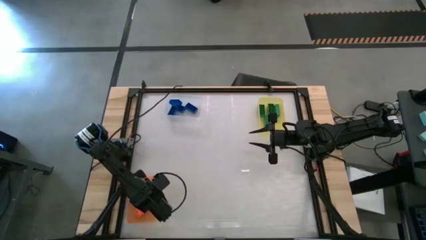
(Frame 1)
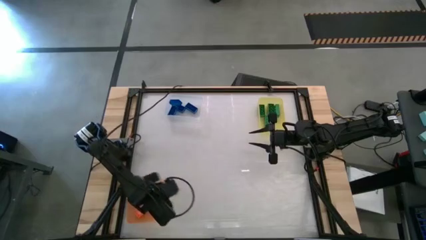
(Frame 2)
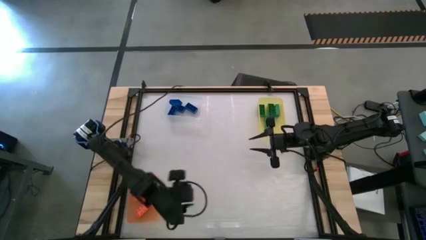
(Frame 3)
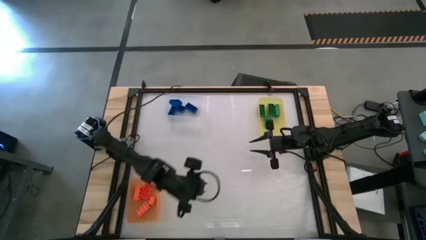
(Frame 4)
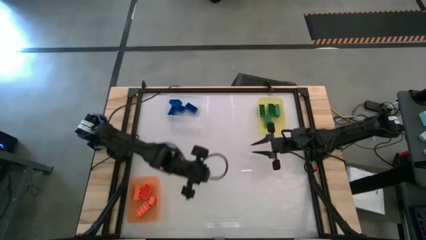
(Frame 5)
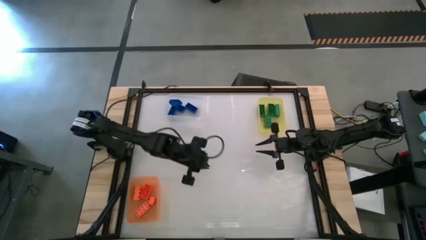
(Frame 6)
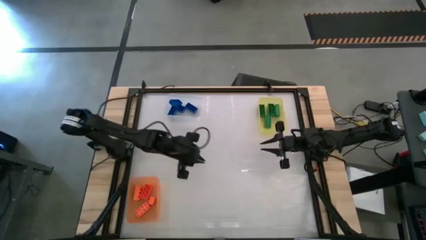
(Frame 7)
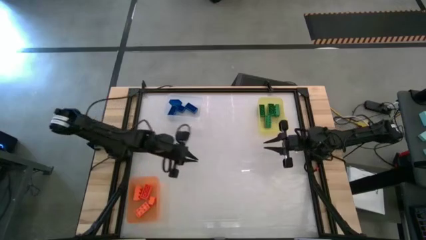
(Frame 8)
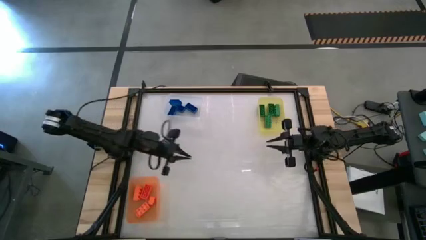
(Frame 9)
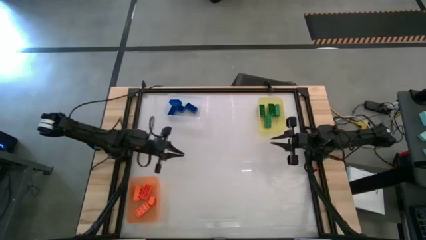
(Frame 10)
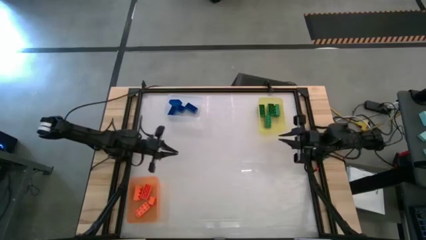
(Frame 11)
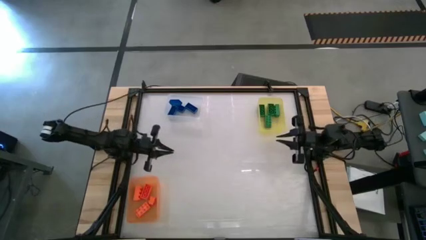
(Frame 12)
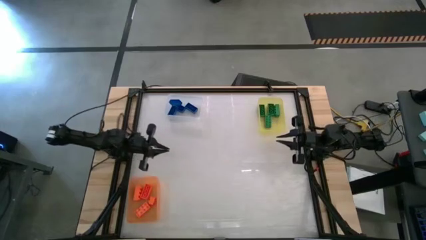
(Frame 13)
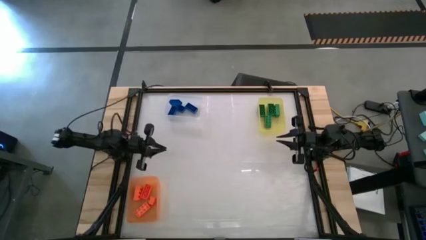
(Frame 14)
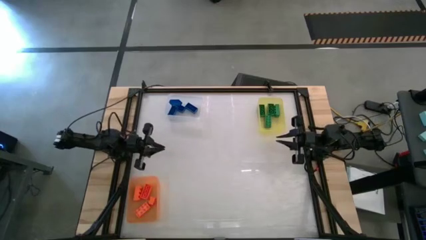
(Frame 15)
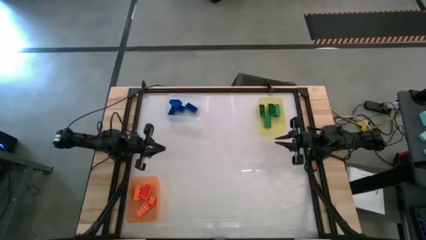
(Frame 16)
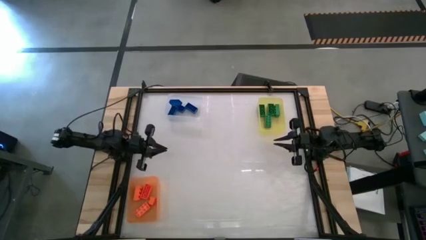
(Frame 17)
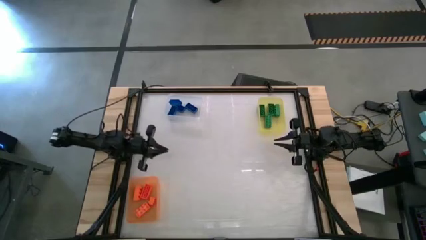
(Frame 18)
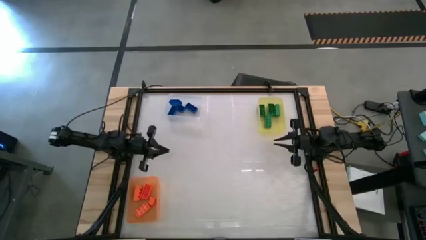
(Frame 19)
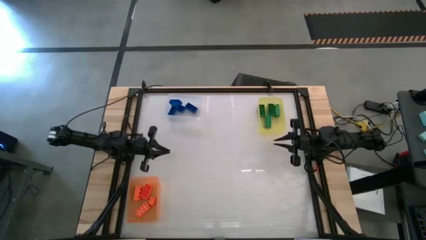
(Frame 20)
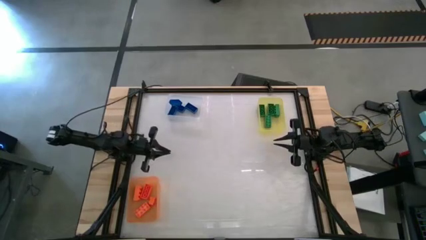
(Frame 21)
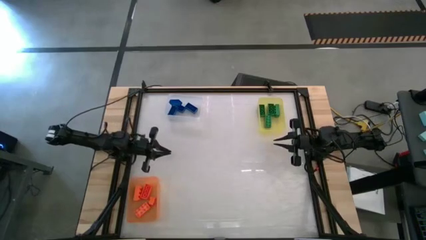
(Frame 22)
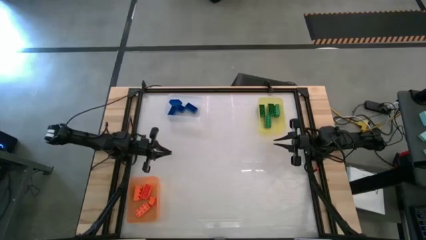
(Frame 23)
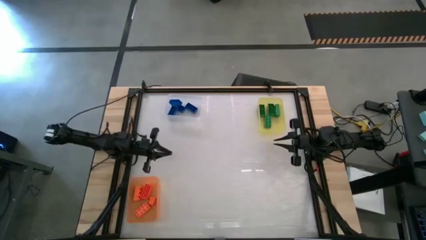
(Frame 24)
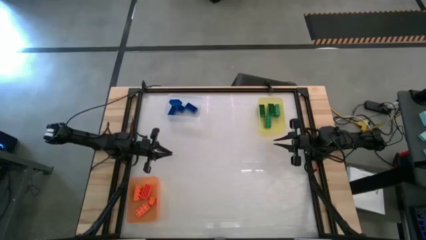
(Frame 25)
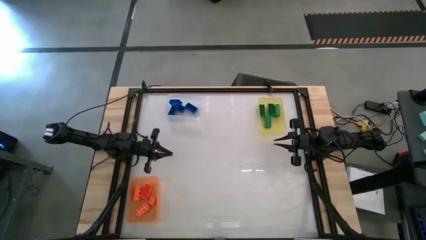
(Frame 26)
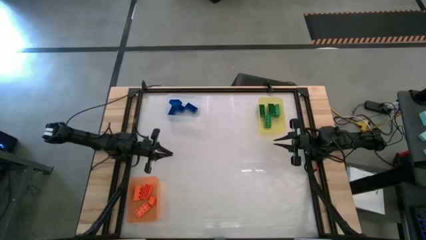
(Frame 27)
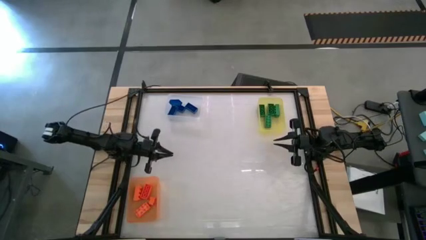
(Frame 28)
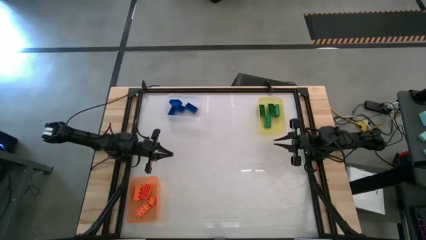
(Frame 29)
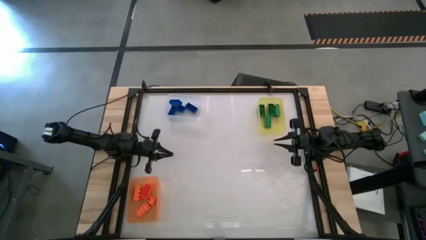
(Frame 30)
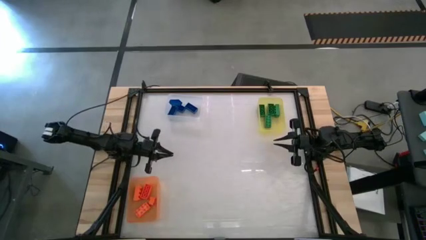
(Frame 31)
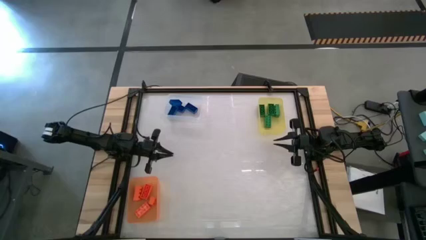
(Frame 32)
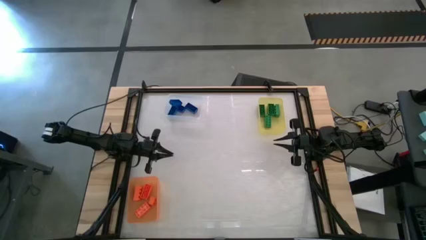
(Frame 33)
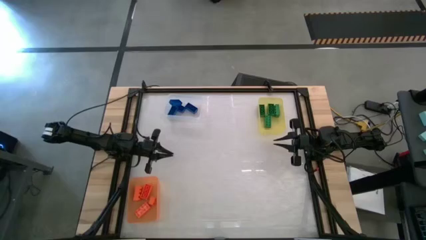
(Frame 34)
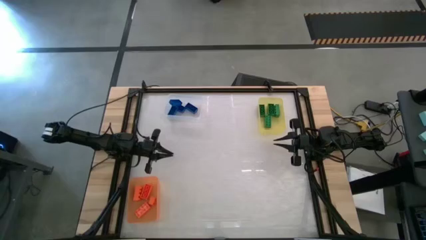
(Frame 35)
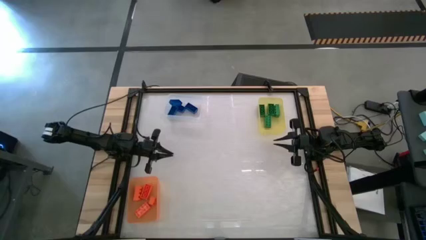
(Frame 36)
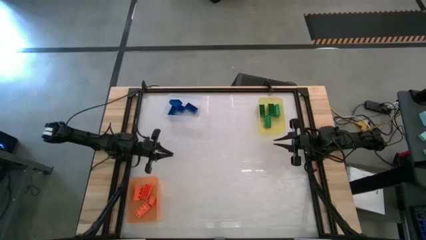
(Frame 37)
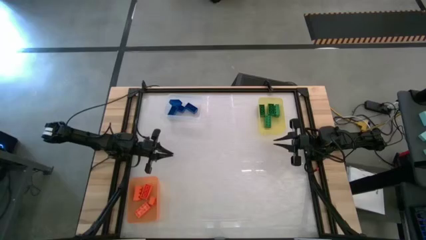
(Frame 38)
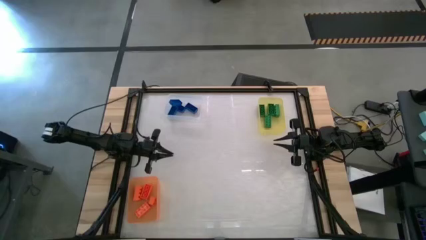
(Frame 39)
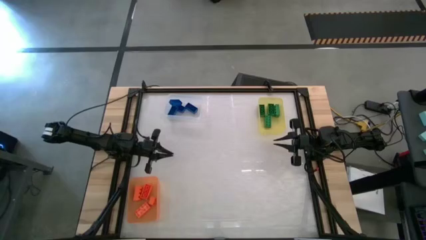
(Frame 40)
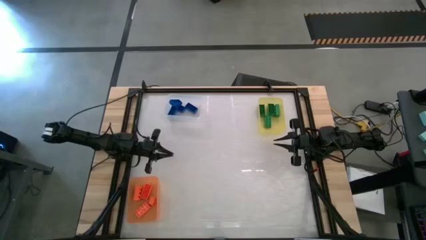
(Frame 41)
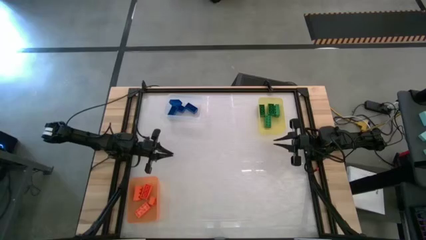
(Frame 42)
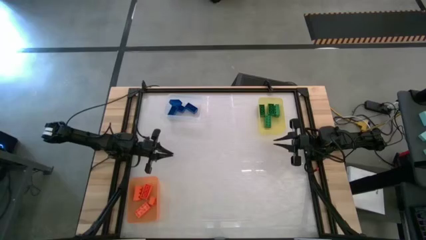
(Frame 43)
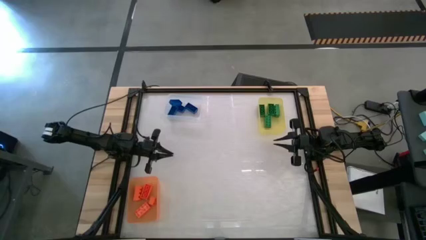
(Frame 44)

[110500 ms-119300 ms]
Task: Sort & place blocks by color
Return to Home Position

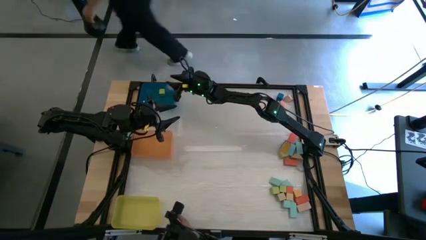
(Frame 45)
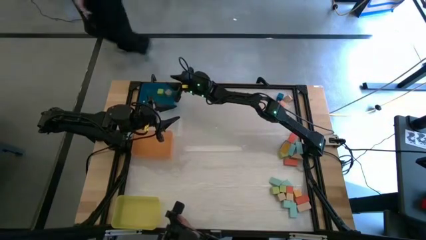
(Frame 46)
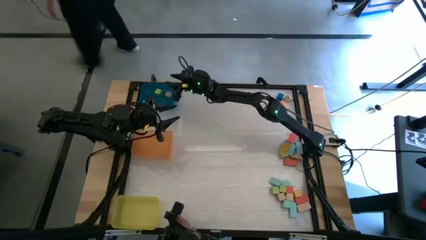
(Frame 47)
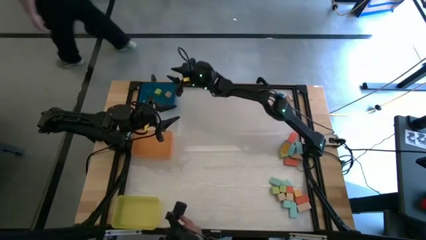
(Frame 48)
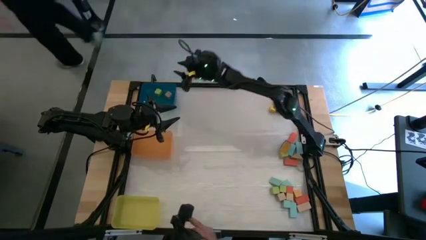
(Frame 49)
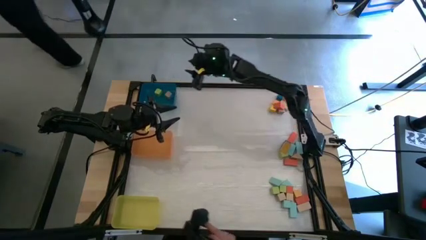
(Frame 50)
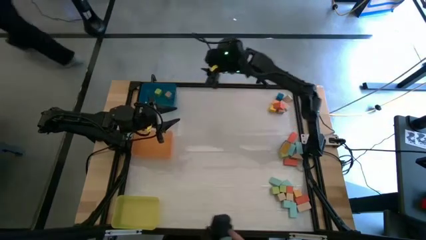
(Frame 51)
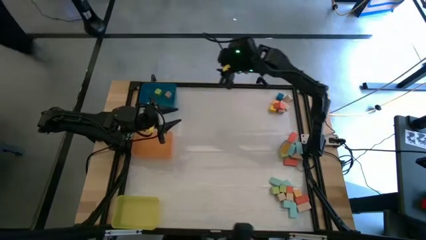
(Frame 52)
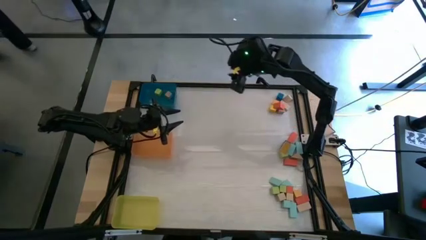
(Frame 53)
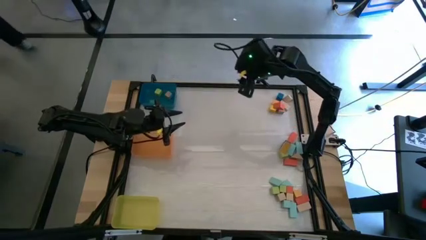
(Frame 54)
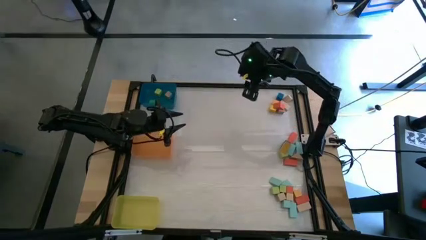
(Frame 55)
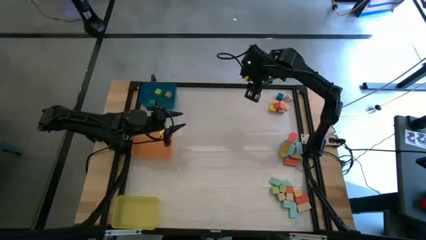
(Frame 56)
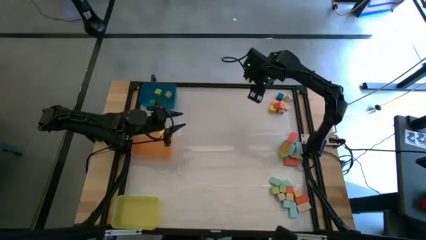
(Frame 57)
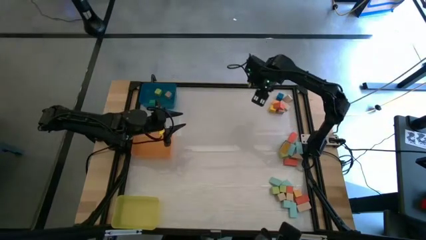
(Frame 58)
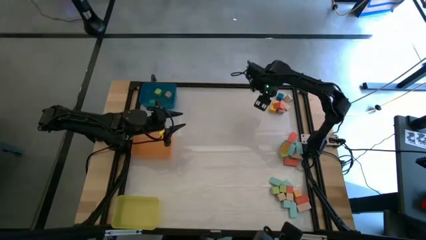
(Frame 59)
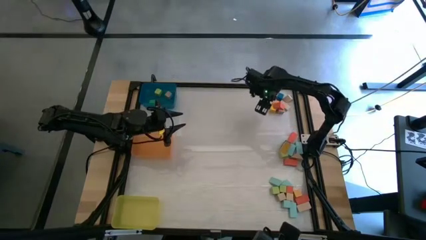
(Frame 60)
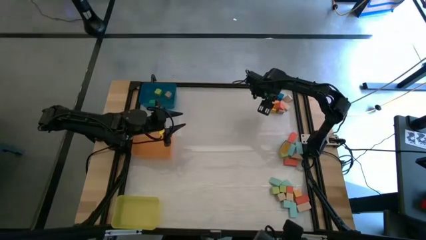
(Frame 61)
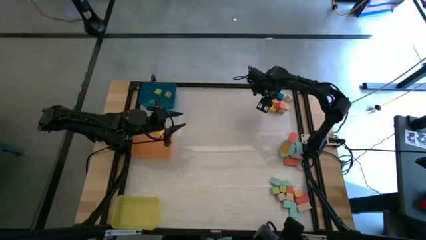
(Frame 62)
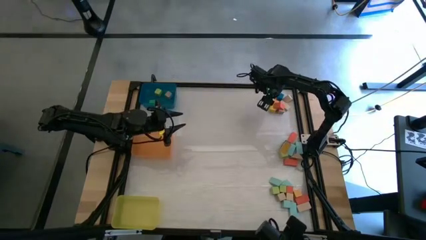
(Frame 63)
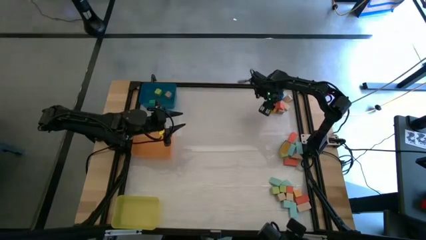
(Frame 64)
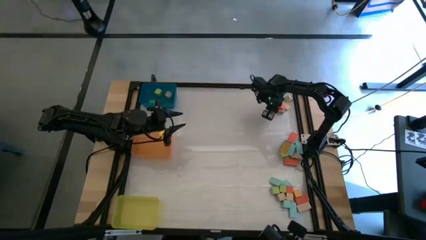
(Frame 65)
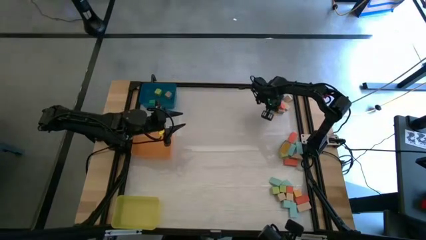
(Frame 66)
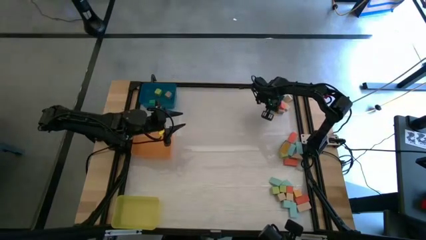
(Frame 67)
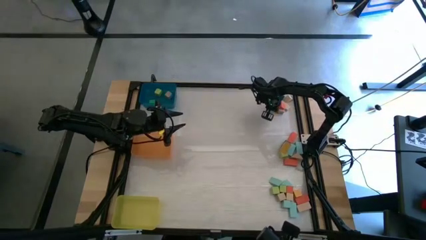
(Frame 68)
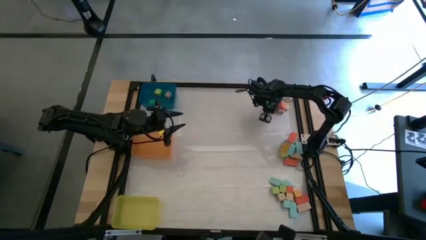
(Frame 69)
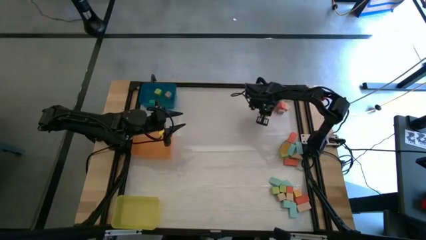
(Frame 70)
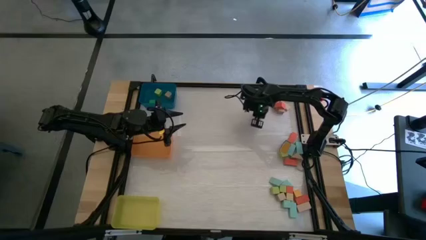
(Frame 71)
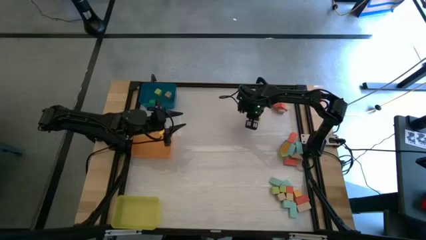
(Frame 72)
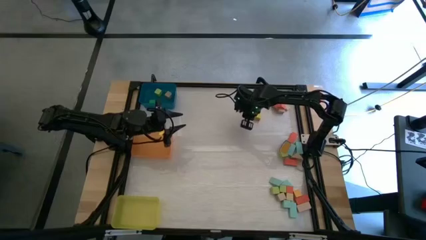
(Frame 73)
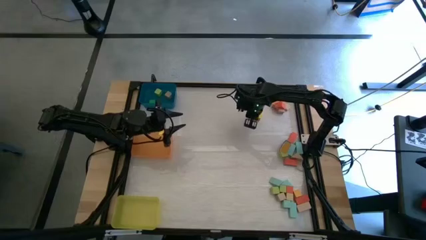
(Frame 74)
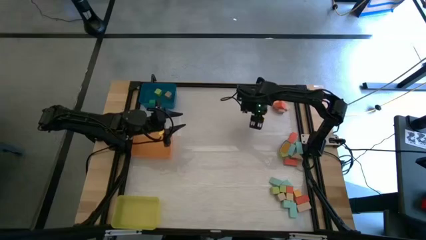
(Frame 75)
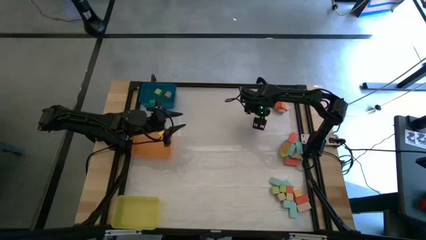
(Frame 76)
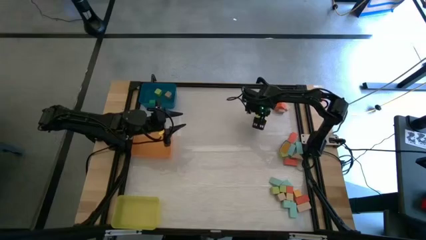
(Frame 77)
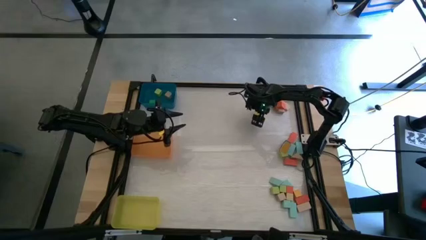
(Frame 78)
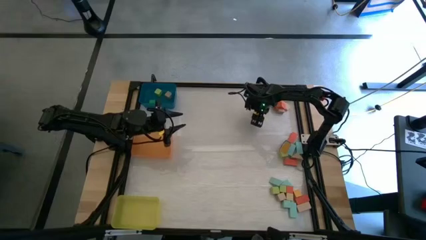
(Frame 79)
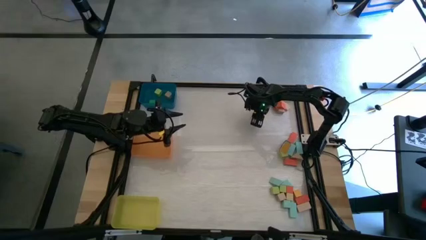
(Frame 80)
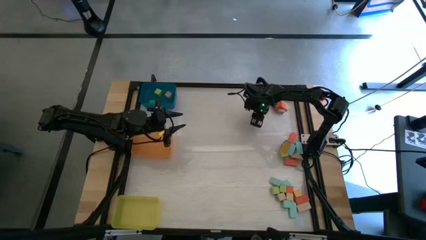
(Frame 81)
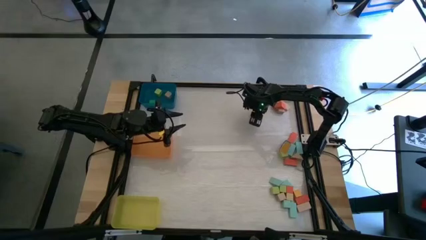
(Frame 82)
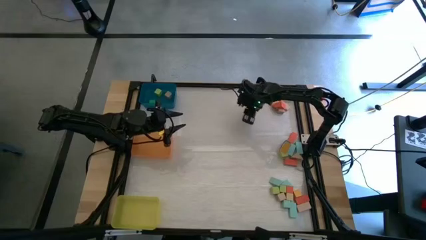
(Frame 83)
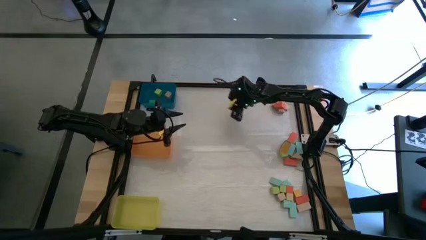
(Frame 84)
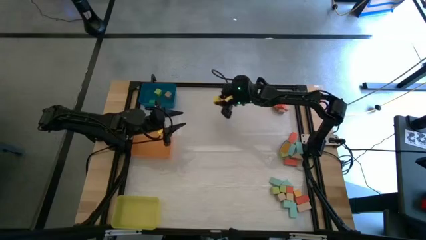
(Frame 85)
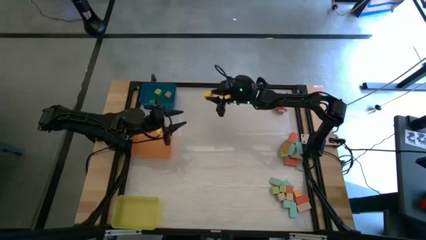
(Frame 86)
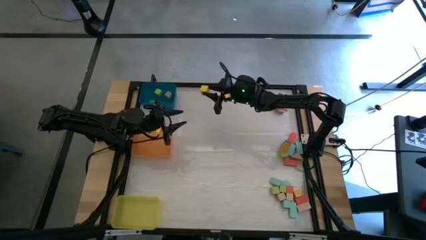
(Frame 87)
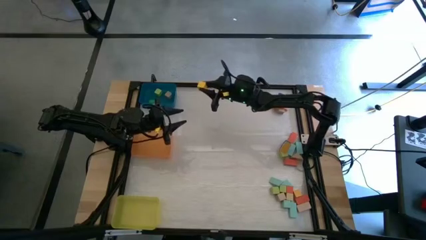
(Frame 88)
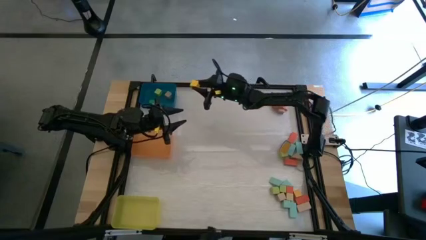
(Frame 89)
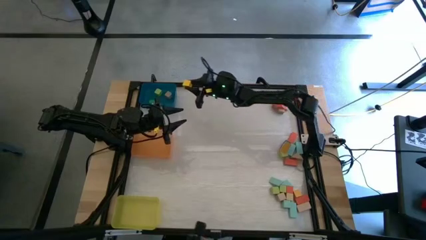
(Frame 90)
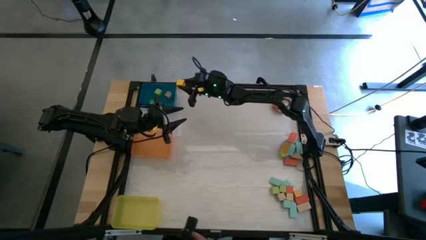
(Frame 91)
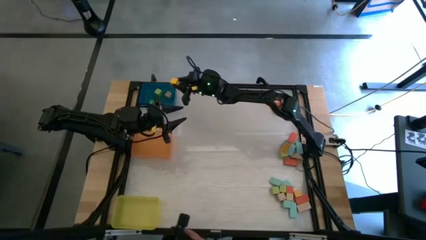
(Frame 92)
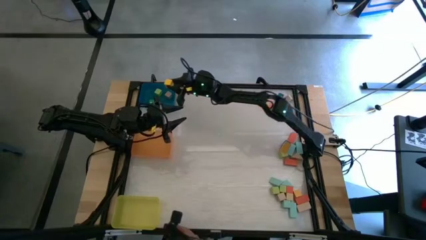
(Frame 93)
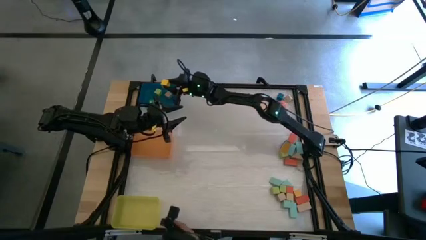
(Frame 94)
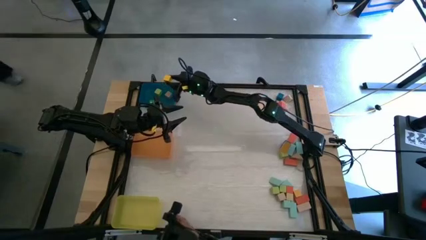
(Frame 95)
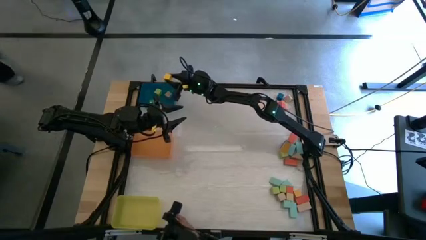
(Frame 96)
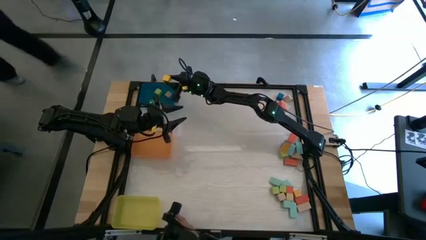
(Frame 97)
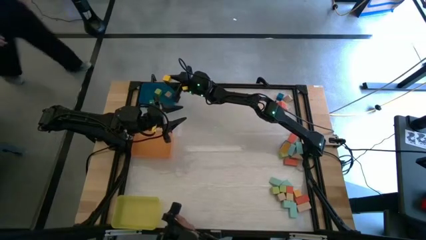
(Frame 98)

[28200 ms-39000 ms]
Task: Sort blocks by size
Put the yellow cube block into the blue bin
